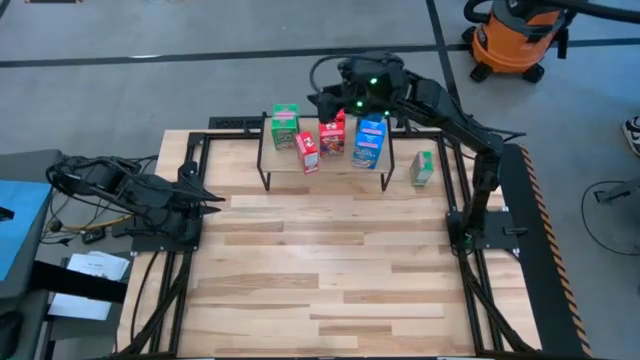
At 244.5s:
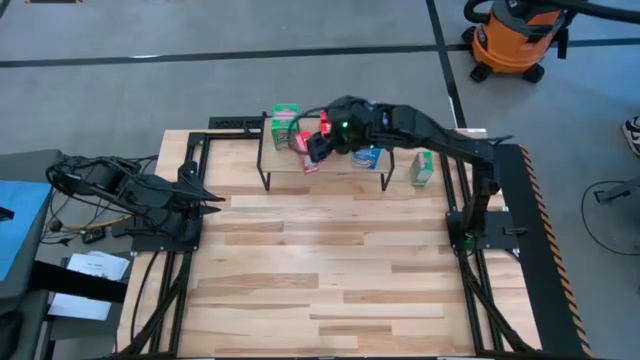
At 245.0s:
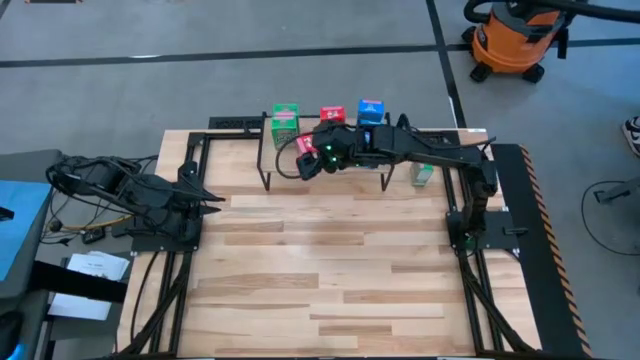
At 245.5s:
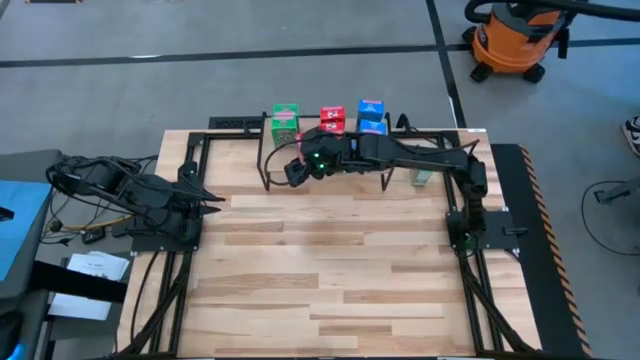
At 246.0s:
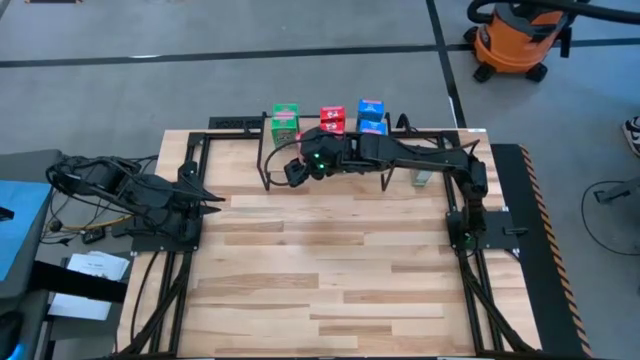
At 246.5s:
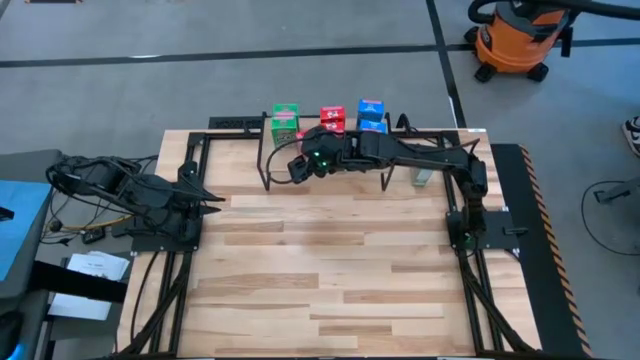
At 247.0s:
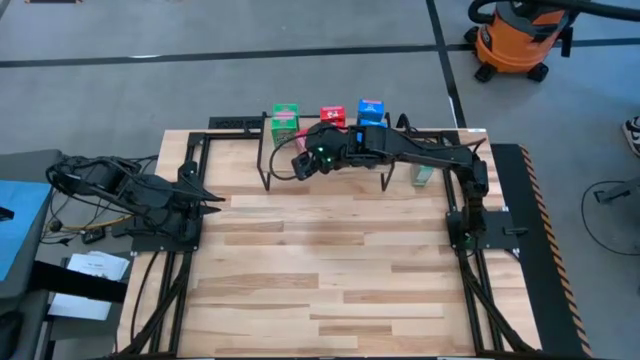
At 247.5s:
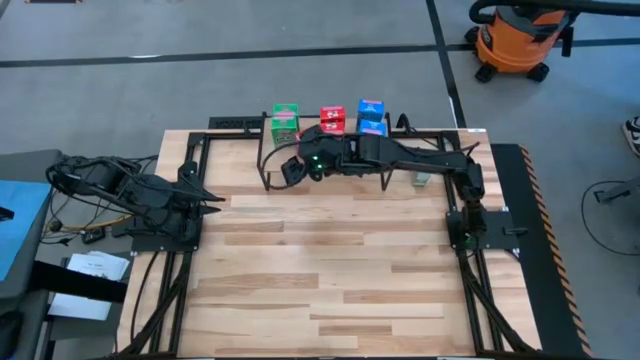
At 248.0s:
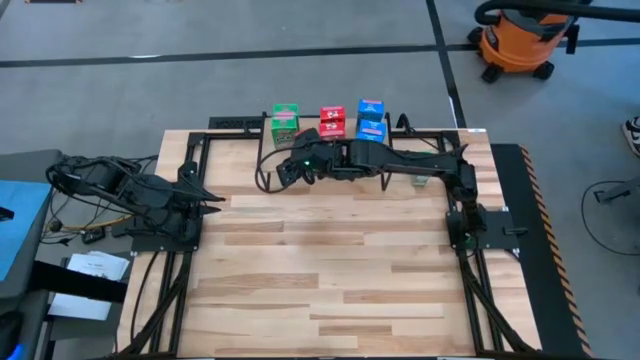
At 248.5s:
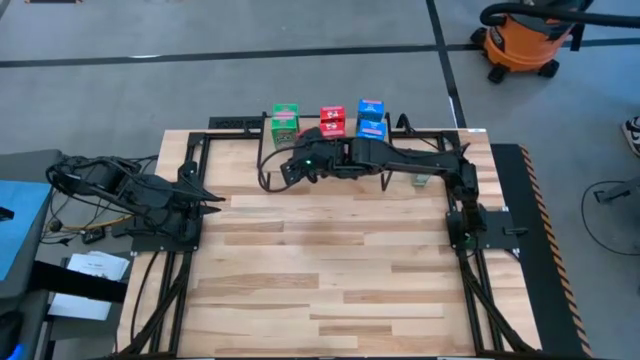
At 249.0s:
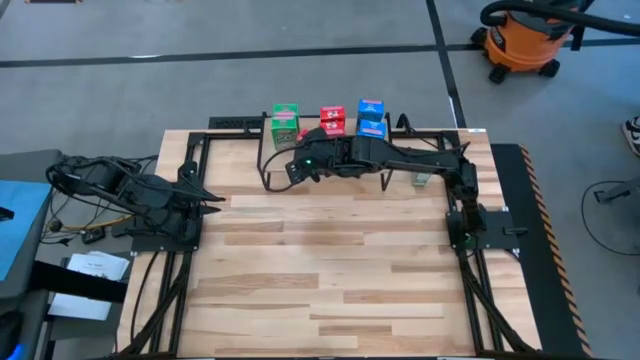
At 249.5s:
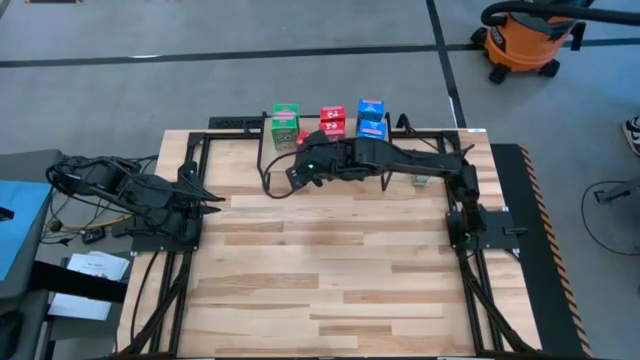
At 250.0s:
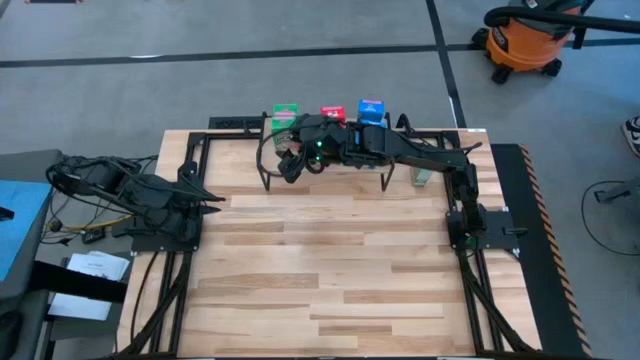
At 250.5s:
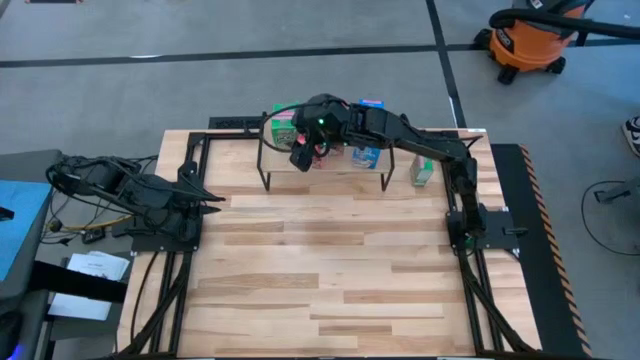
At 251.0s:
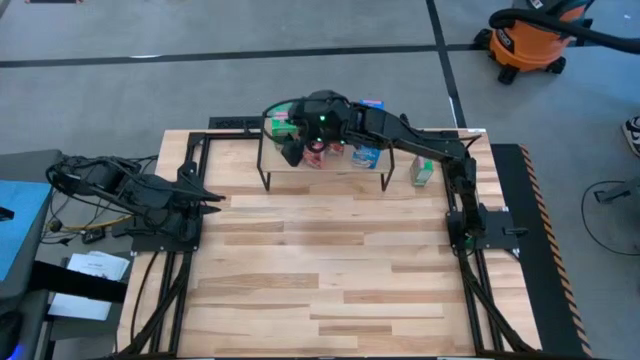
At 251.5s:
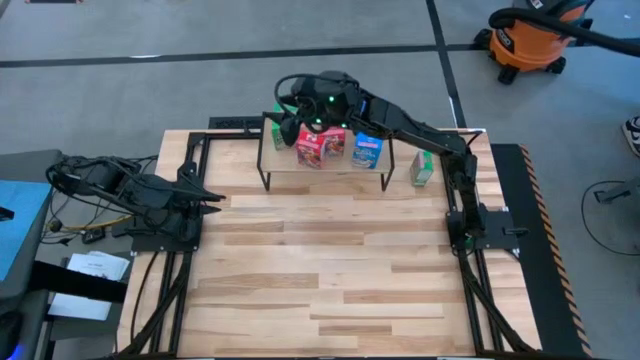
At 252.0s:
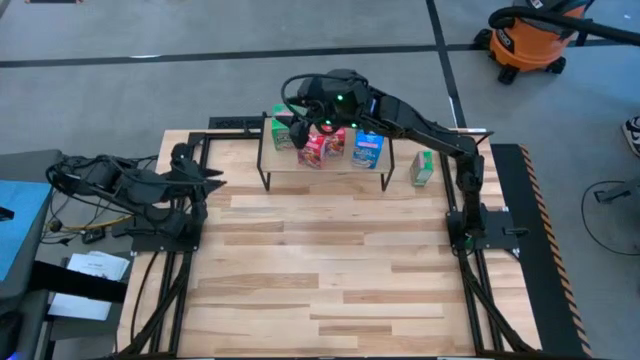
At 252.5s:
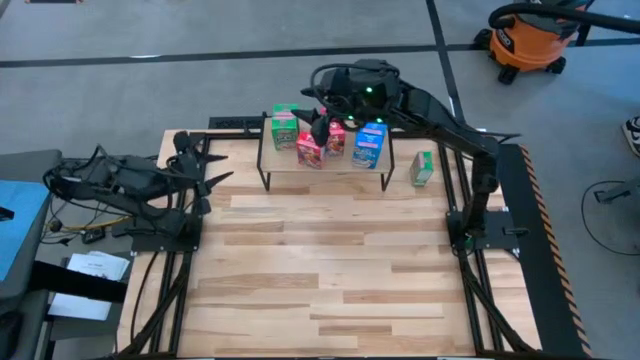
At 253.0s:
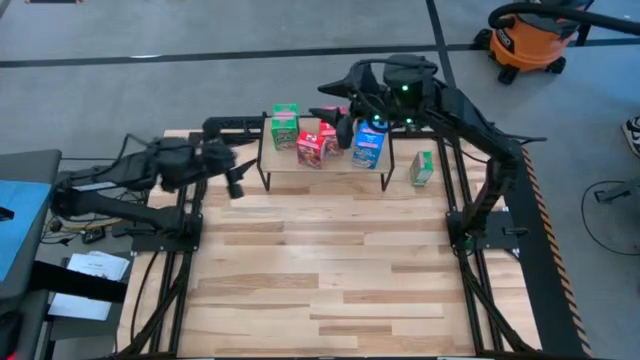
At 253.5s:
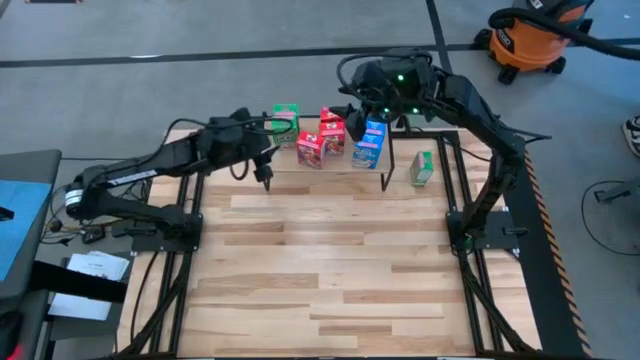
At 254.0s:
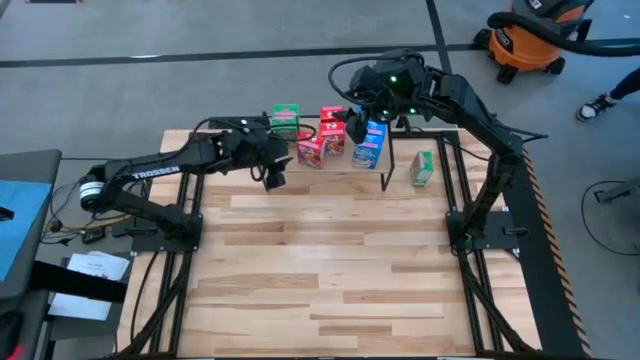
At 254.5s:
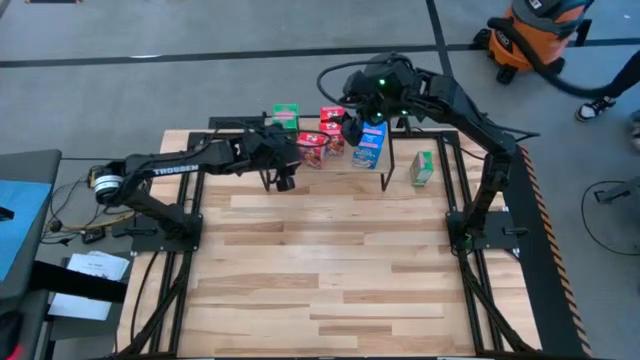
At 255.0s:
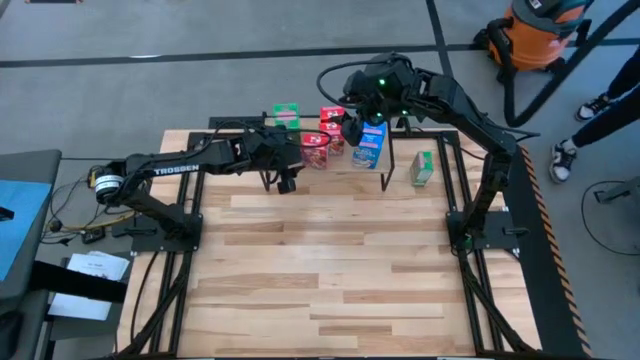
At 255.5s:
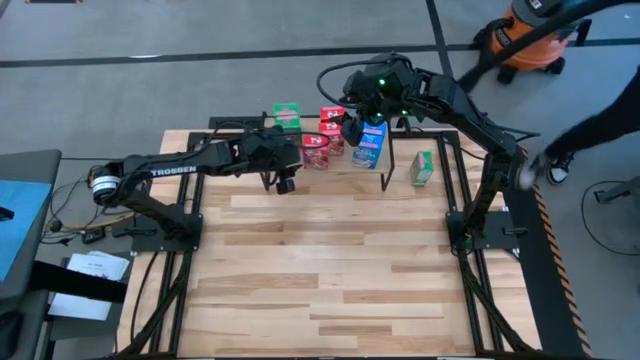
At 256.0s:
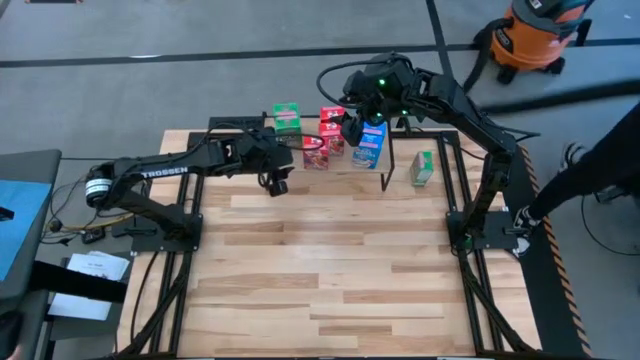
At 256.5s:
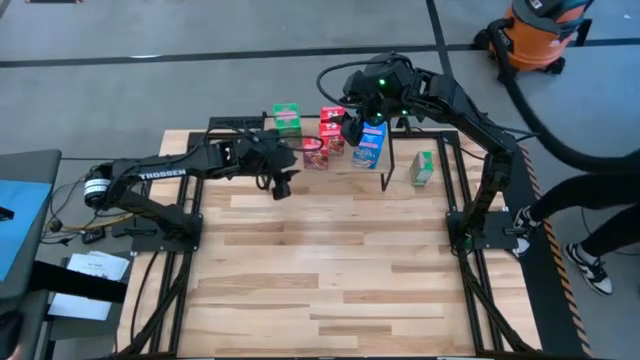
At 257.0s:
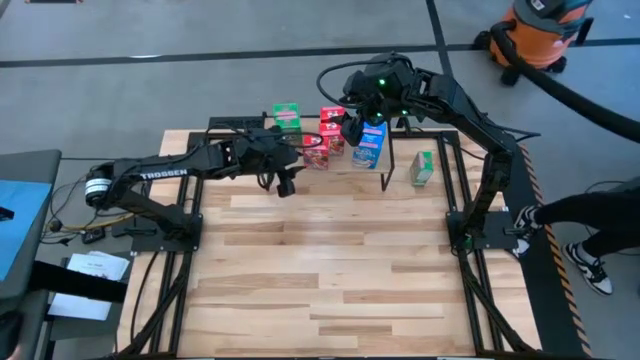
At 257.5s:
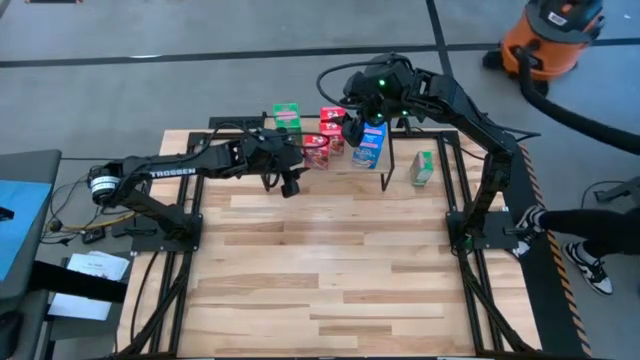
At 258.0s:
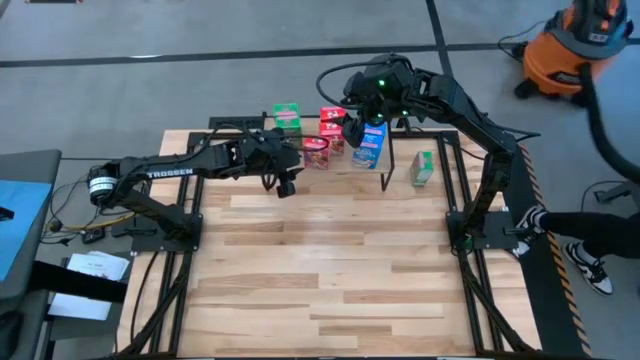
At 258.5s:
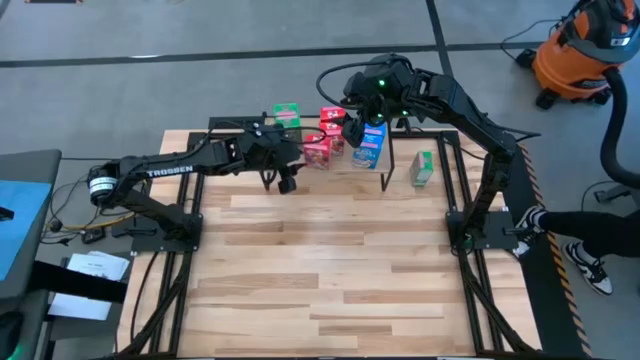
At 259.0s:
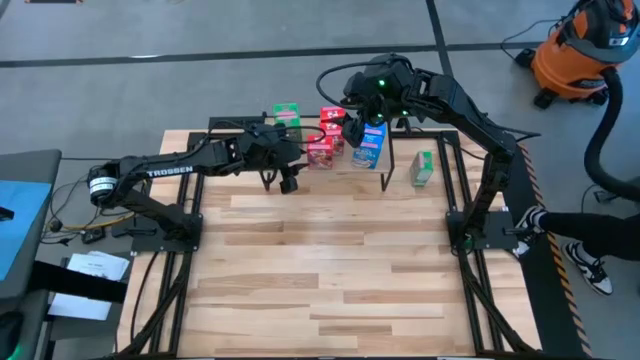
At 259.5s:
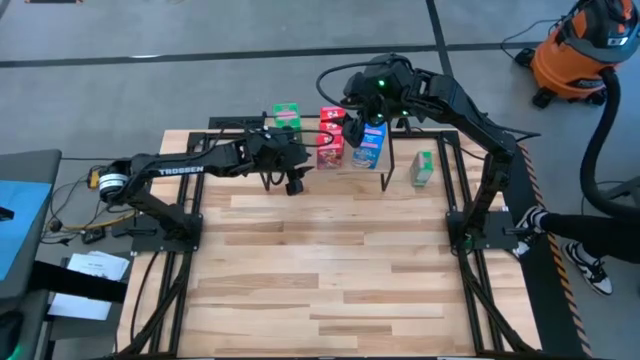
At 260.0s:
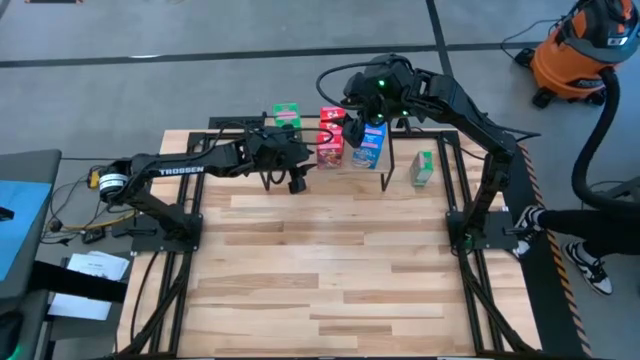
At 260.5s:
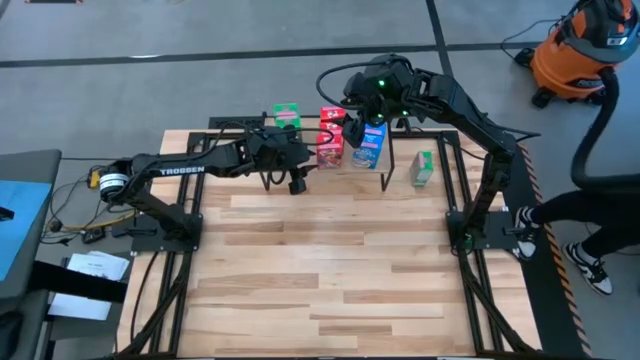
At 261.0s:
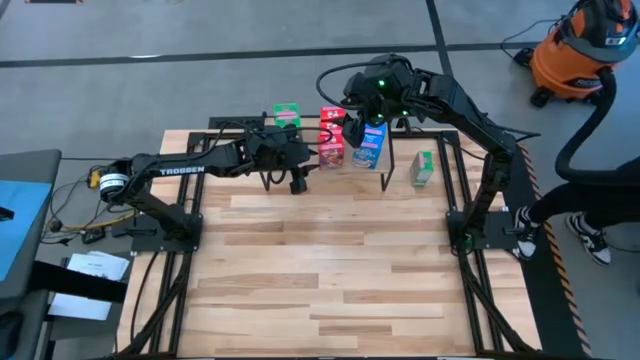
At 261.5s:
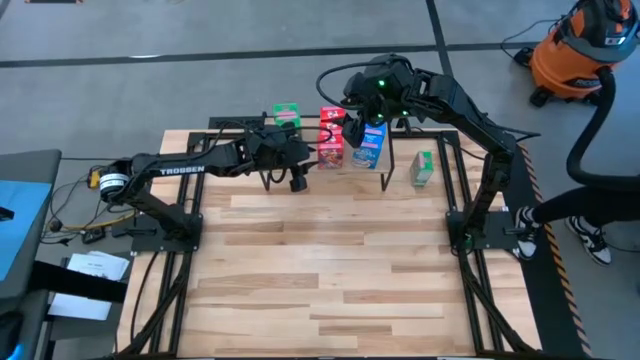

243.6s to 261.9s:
Task: Stack cereal on shelf
Put the red cereal box on the shelf aligned with the other red cereal box
